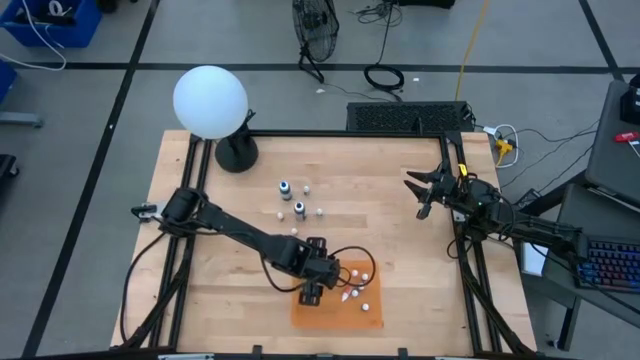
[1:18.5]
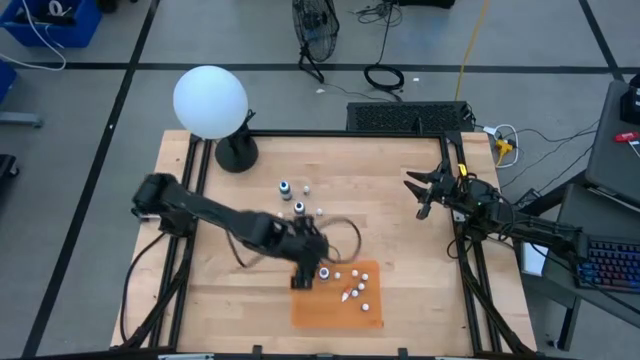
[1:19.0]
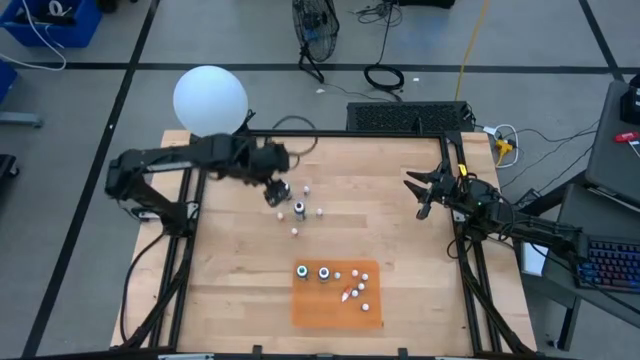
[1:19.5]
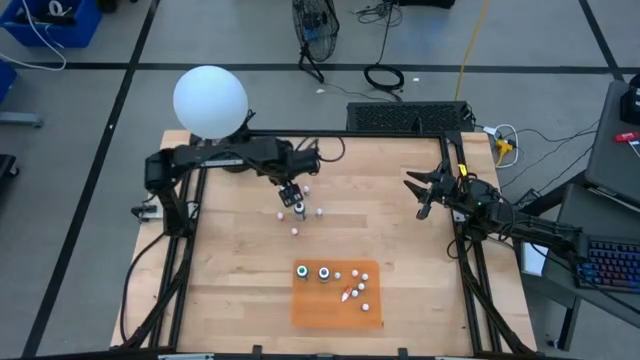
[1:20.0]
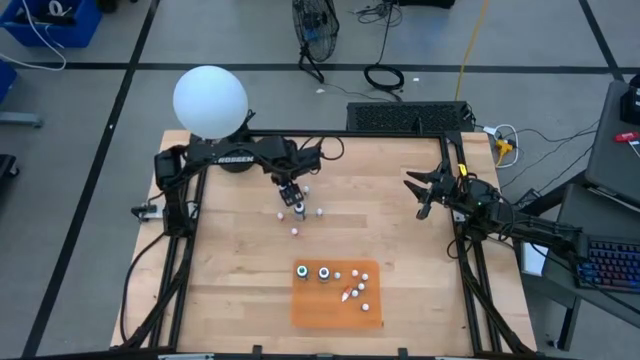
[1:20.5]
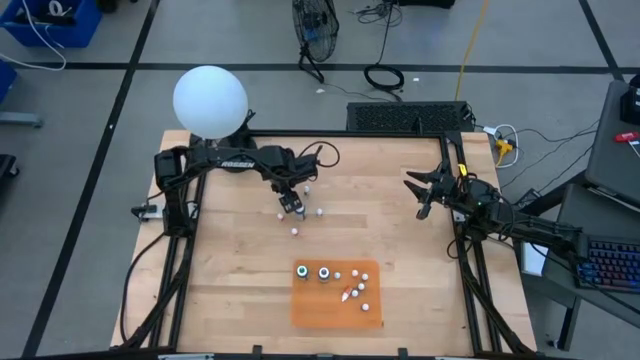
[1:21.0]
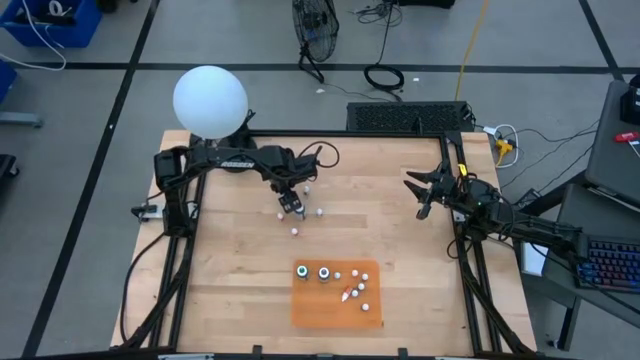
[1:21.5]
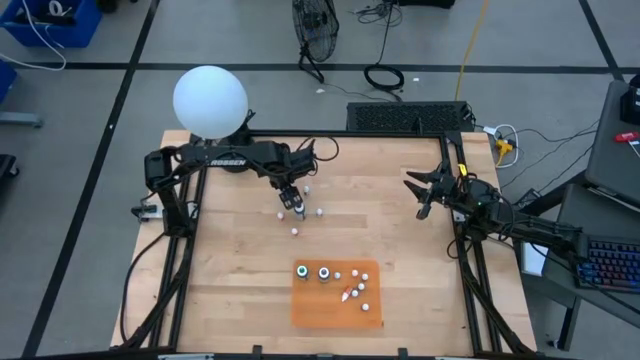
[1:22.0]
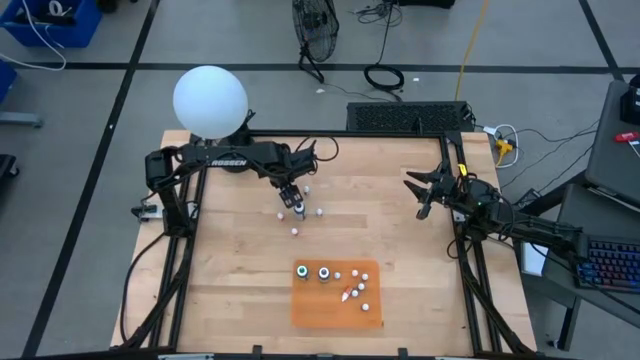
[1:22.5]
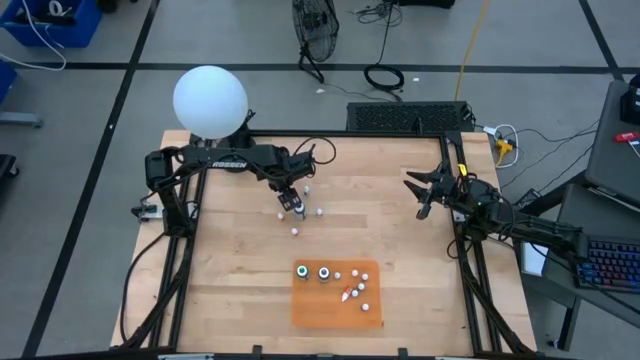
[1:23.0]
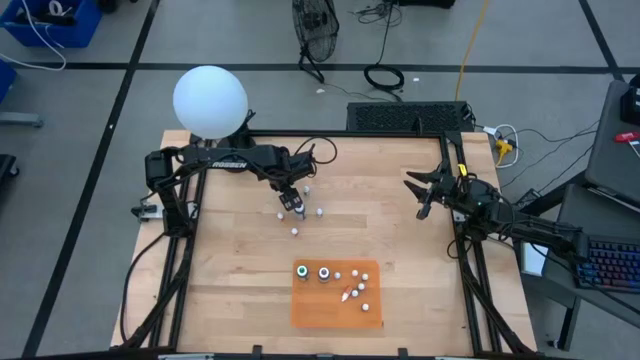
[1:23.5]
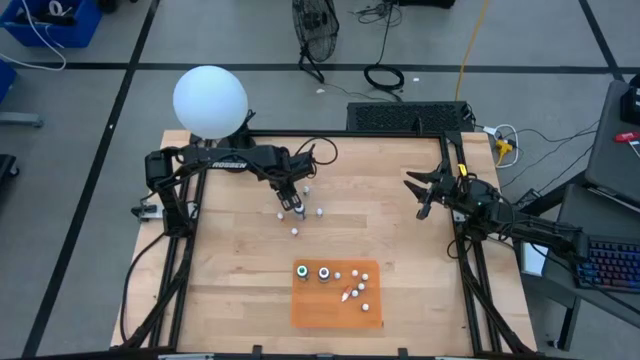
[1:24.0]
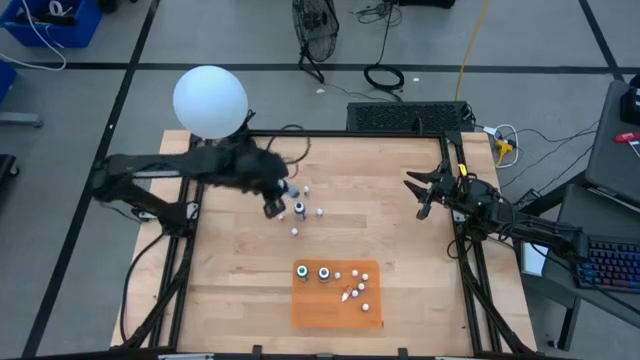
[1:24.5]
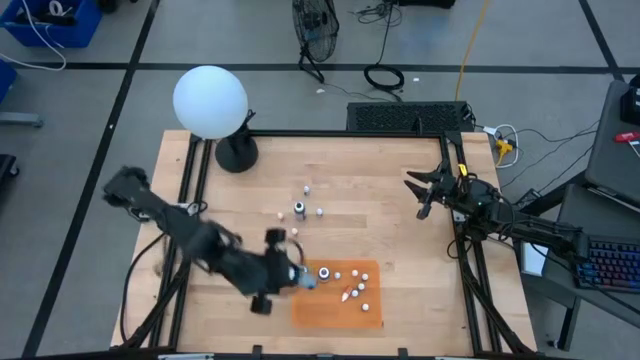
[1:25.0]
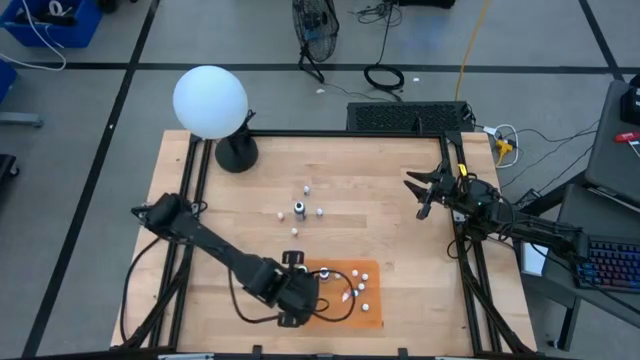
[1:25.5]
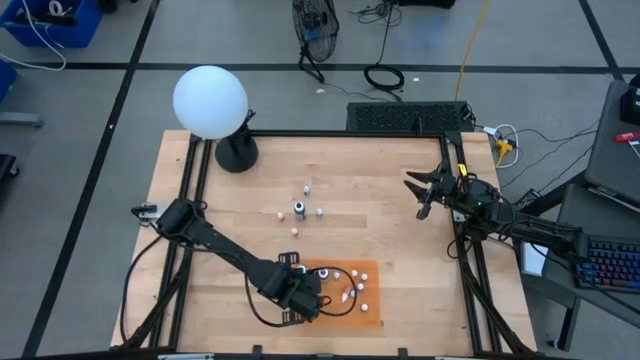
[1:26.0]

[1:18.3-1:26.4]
Task: Pick & Place food coloring
Put the large blue food coloring bottle into the orange container

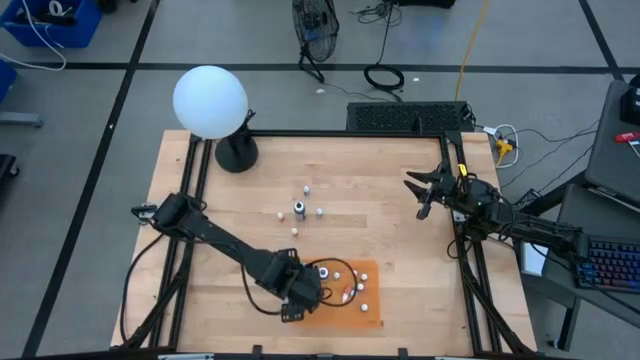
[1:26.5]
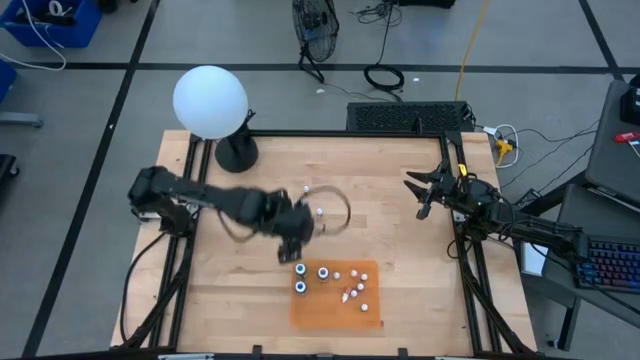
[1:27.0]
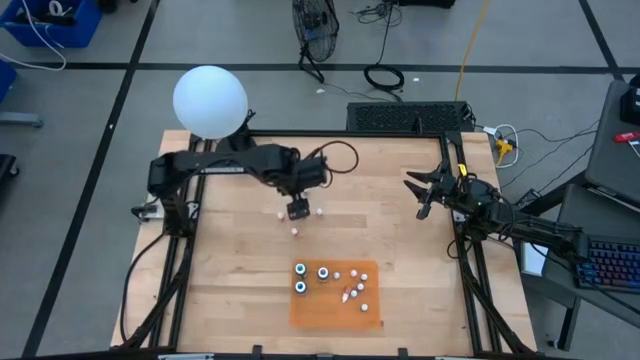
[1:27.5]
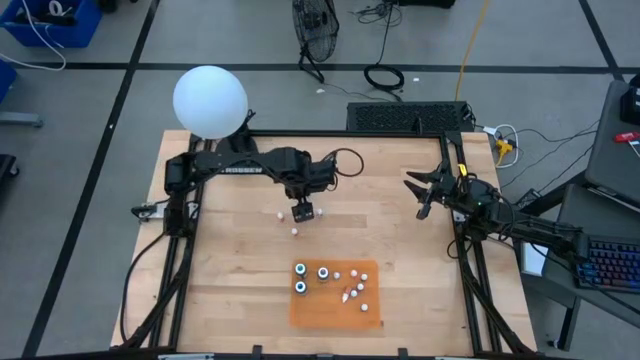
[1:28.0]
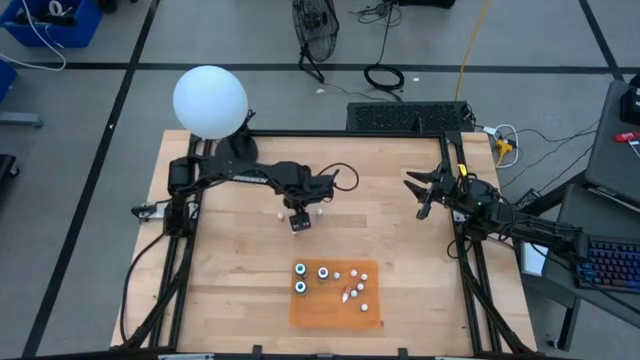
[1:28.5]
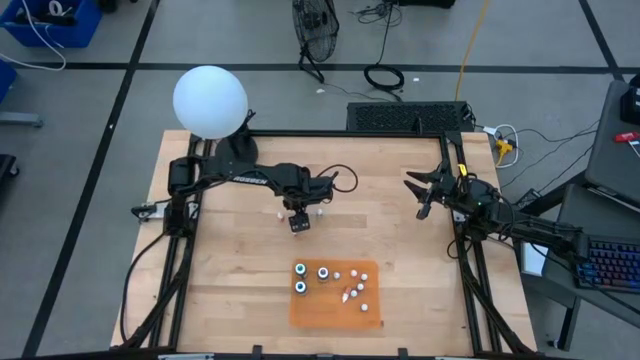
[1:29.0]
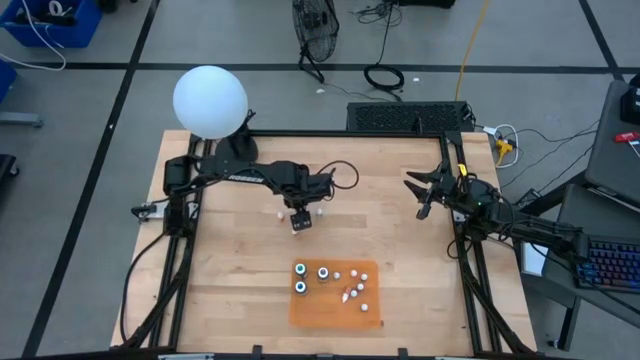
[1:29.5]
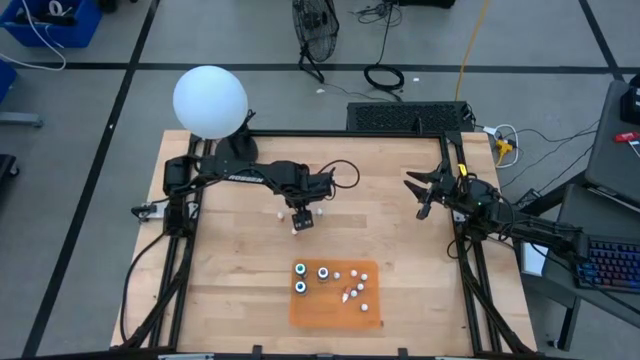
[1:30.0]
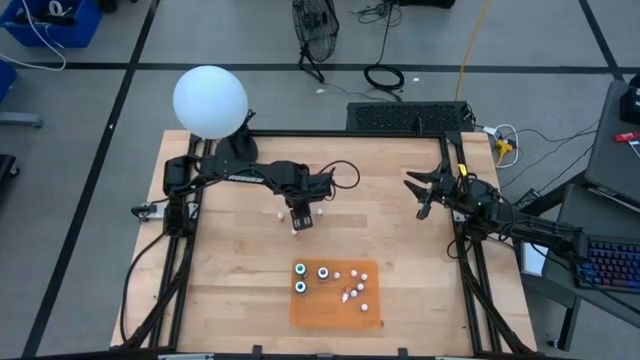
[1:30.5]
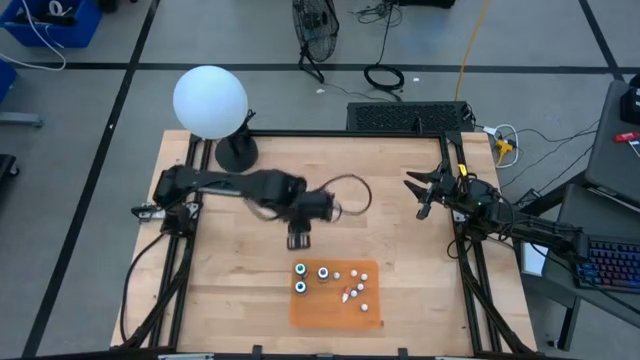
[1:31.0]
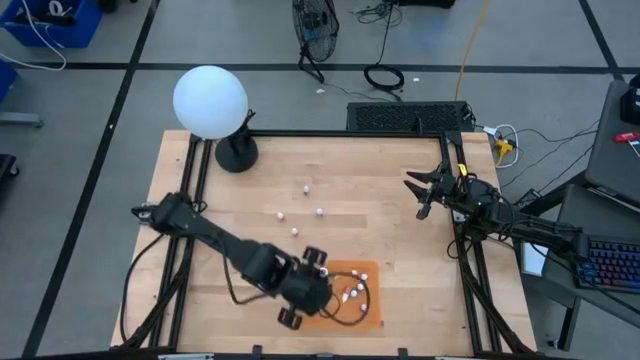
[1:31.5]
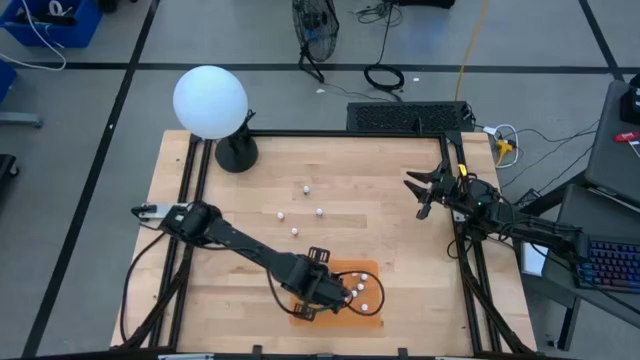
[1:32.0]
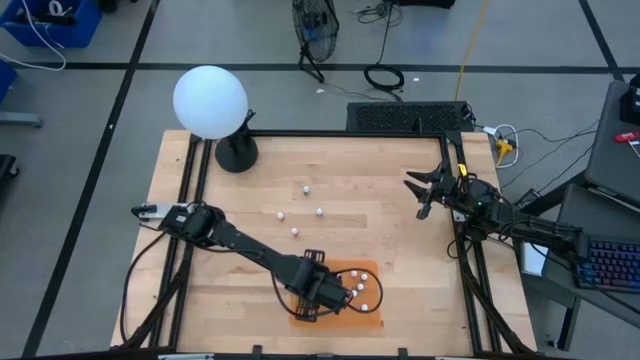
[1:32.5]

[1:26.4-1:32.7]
Put the large black food coloring bottle into the orange container

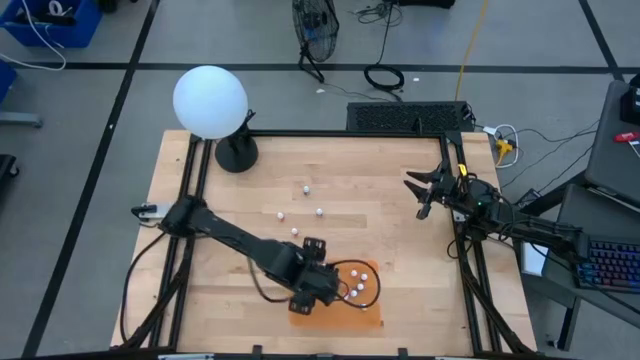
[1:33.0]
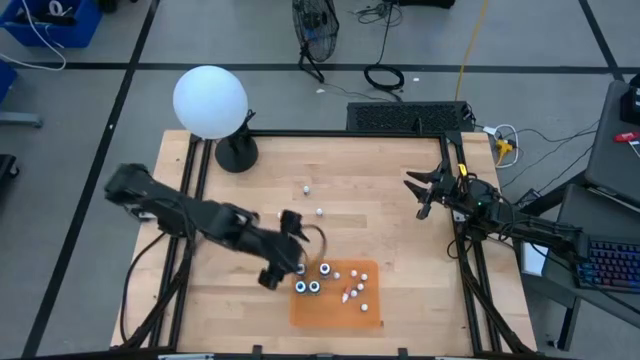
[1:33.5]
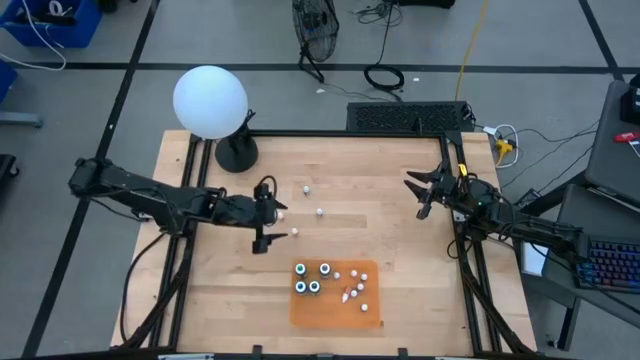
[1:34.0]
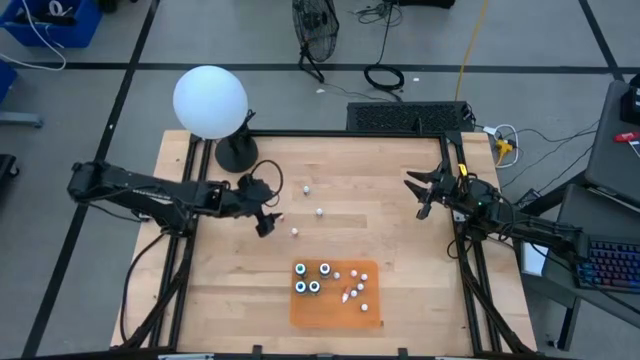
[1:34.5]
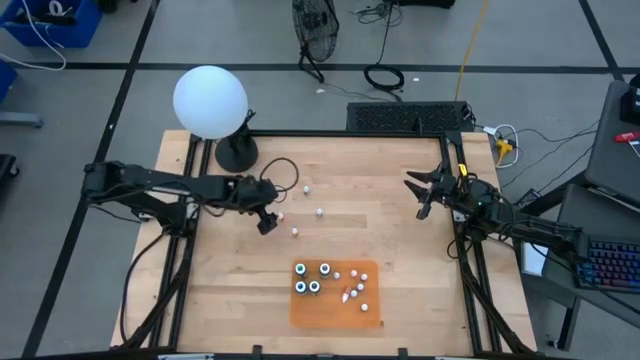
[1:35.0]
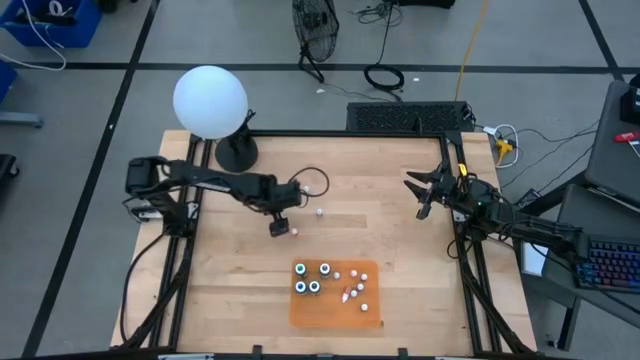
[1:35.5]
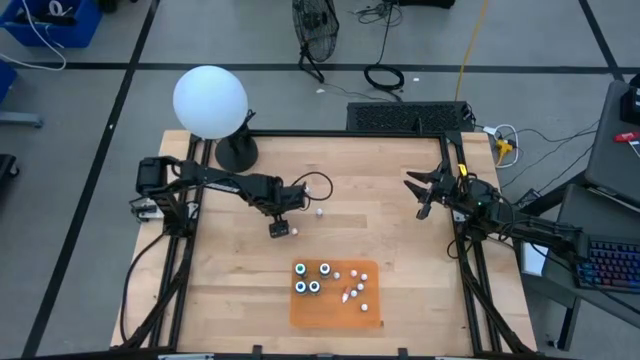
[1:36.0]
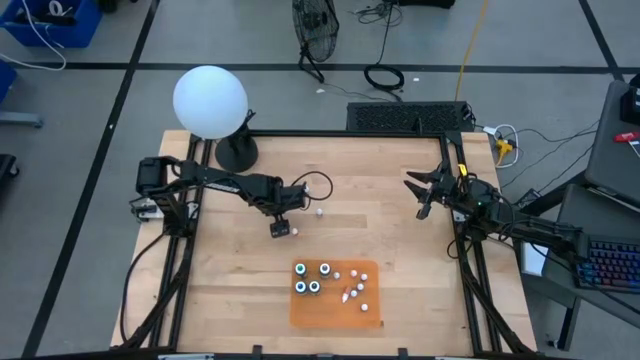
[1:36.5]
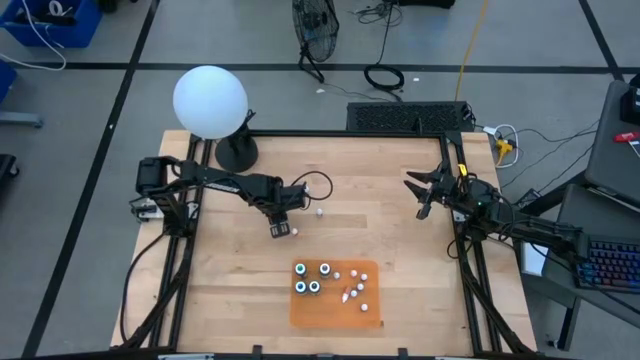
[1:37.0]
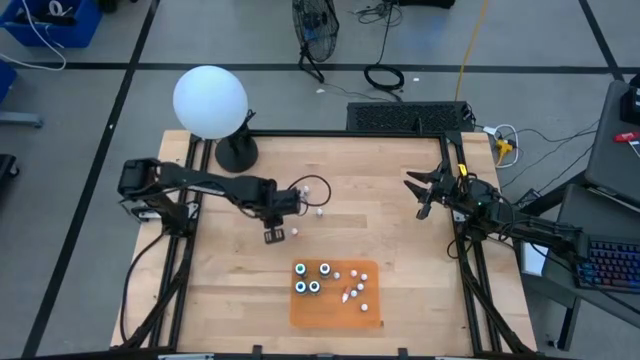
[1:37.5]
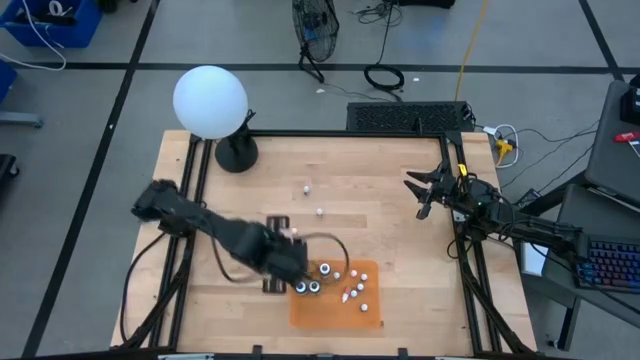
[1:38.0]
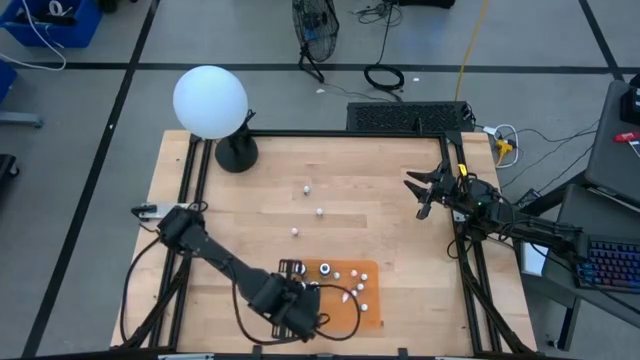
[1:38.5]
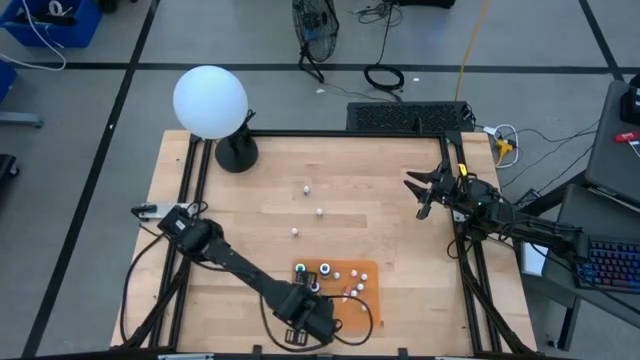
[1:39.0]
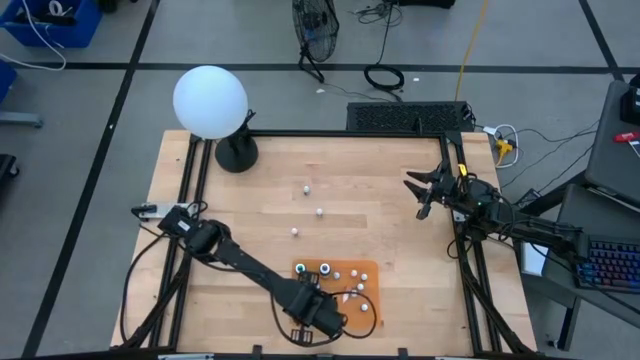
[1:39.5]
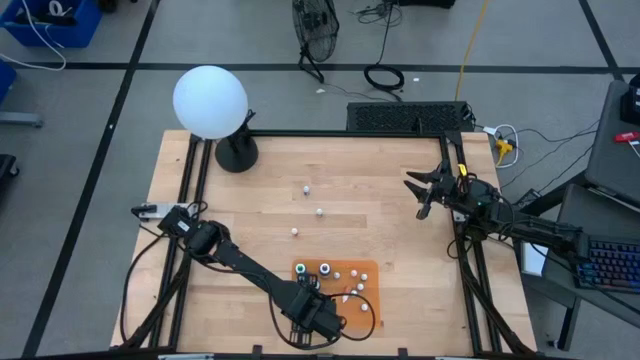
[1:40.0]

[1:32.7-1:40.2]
Put the small orange food coloring bottle into the orange container
